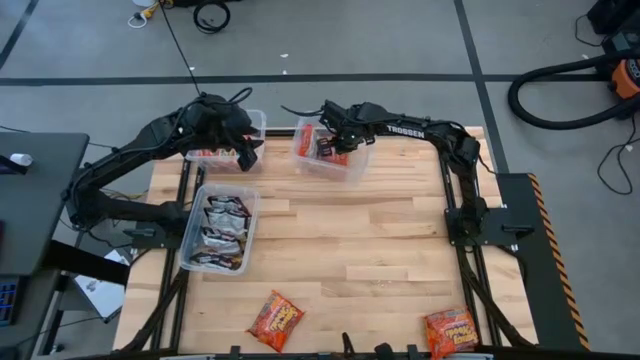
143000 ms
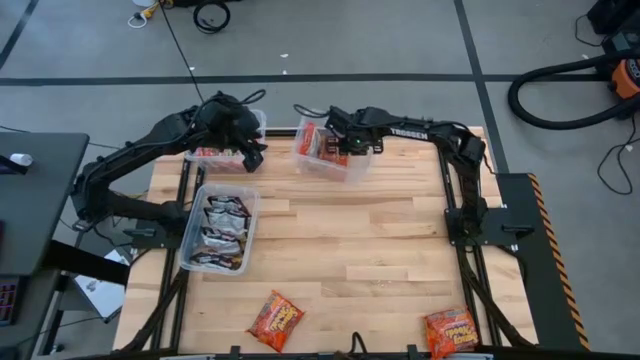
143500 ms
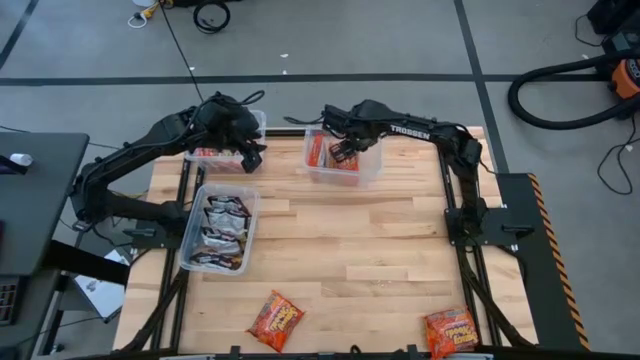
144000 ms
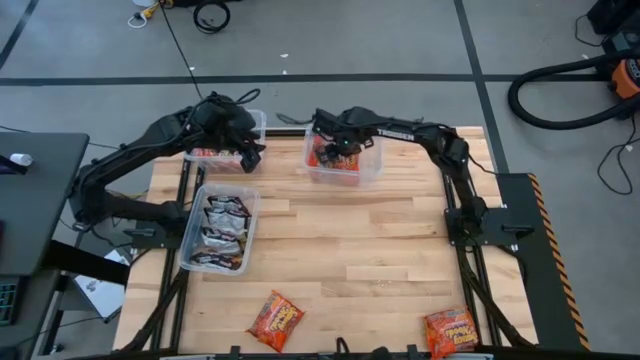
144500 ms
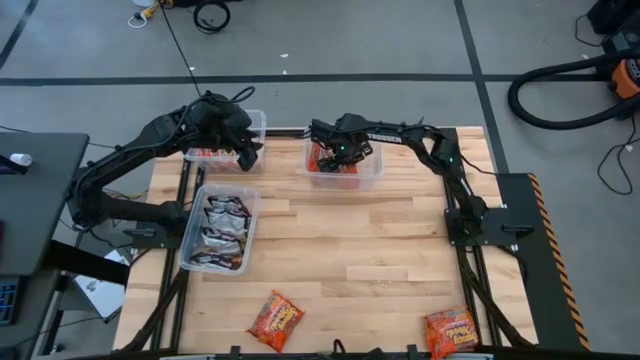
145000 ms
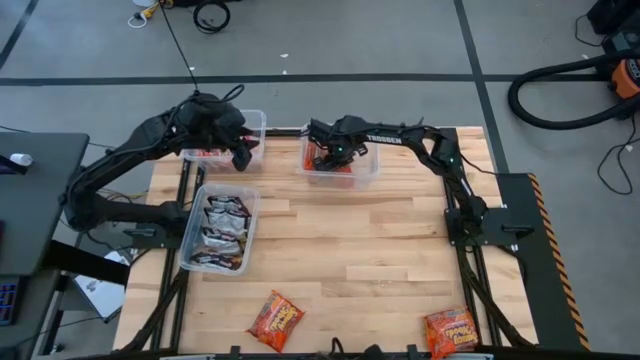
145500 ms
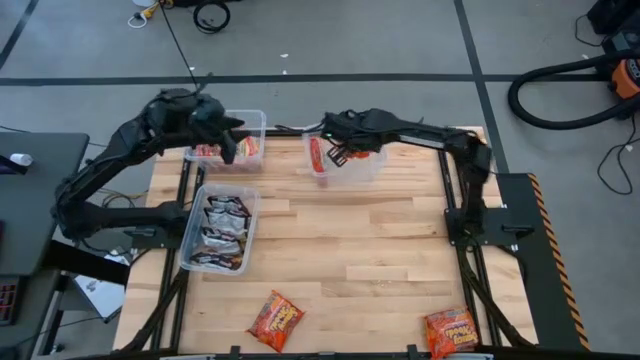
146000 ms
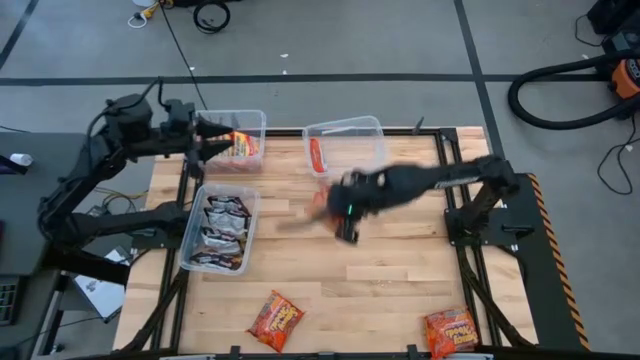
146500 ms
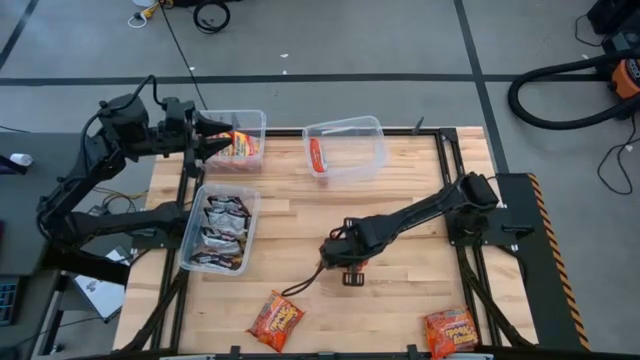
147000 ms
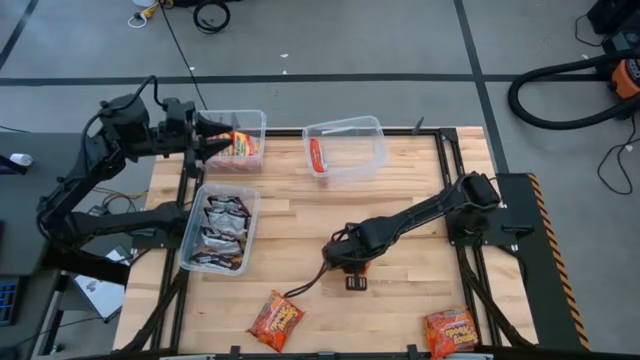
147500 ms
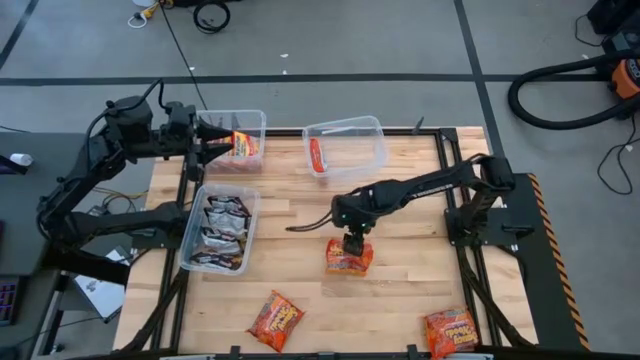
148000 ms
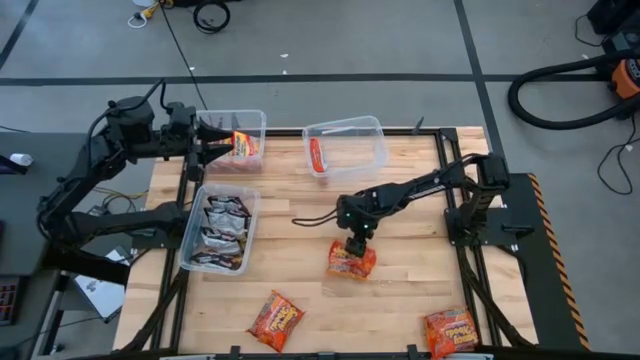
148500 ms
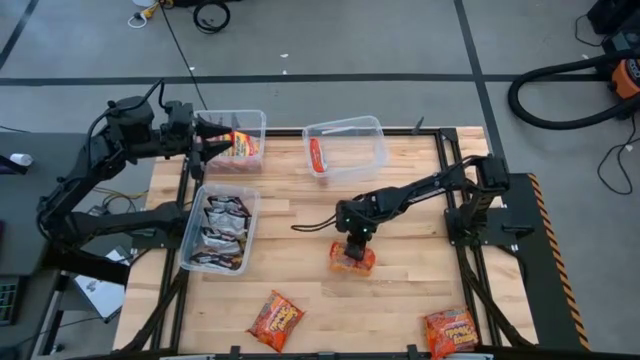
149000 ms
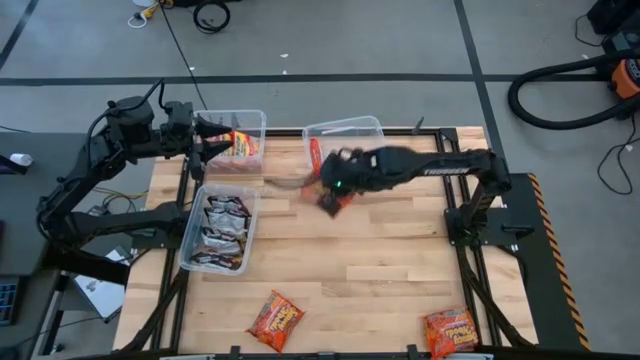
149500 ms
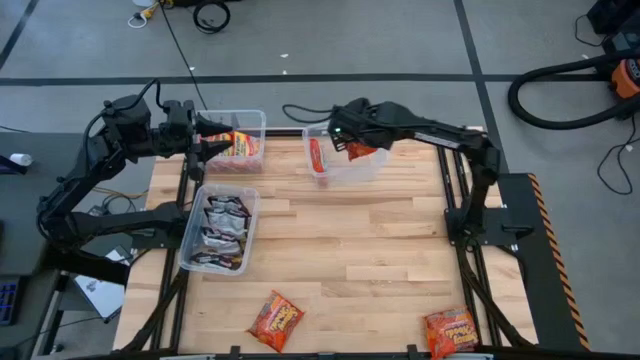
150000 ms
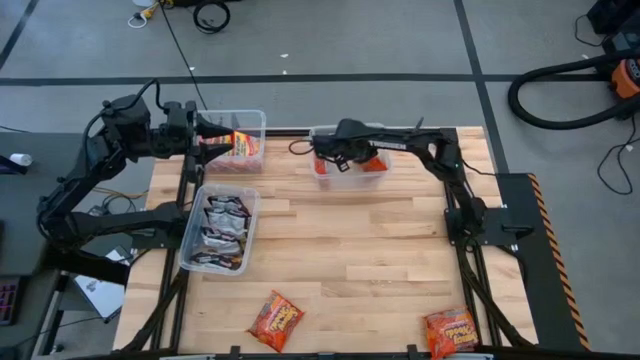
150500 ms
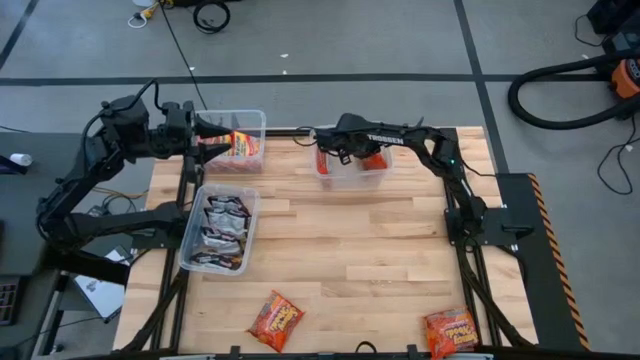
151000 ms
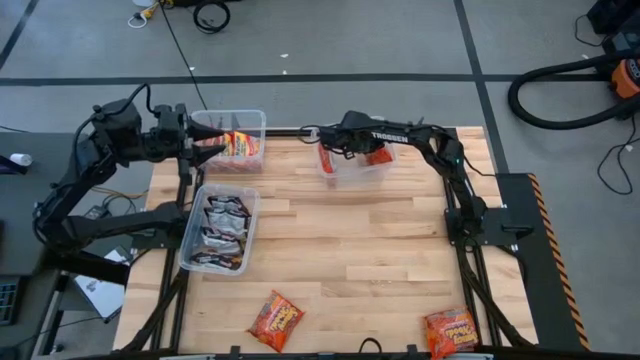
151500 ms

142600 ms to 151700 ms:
Task: Sort Maruchan noodles
Put the center orange noodle into the top transparent bin

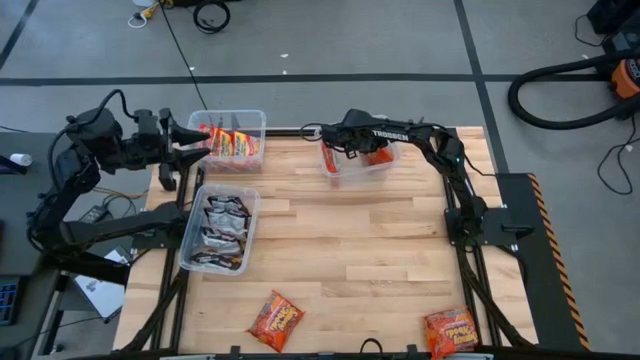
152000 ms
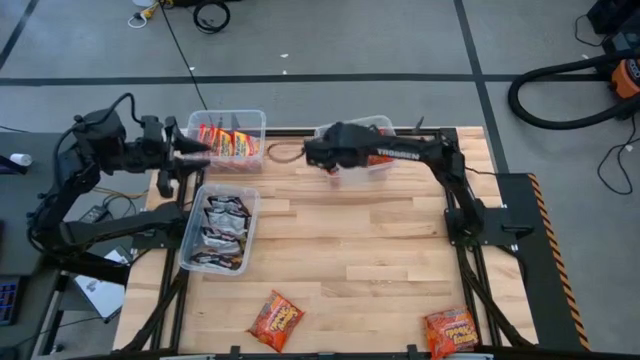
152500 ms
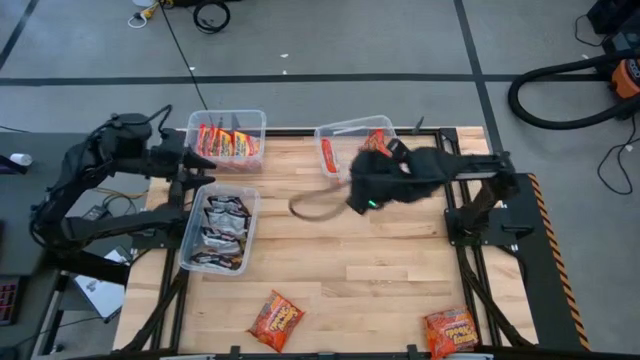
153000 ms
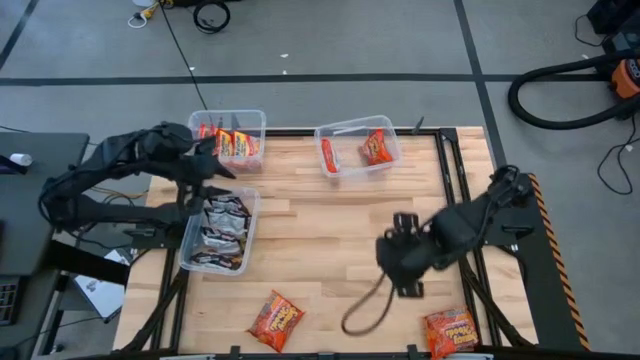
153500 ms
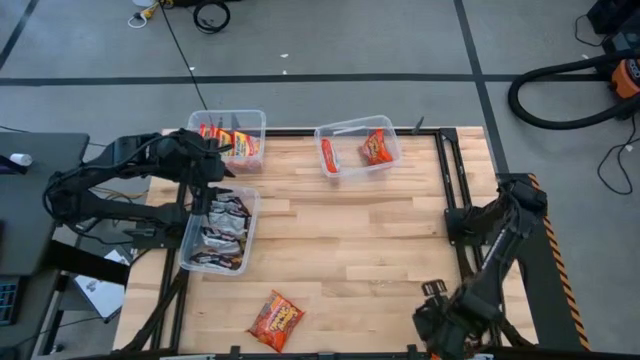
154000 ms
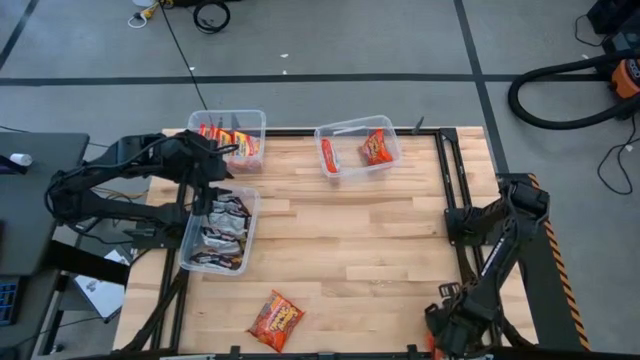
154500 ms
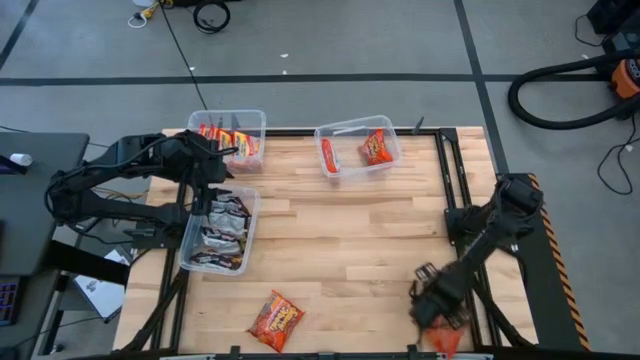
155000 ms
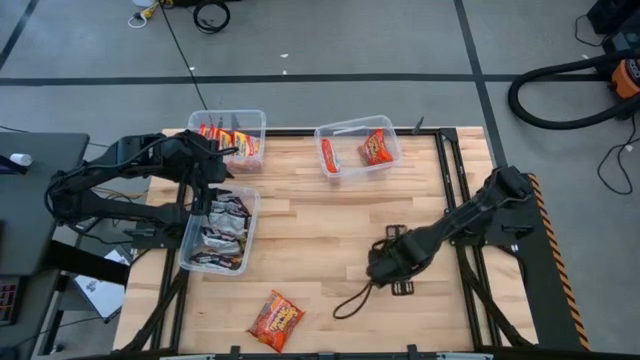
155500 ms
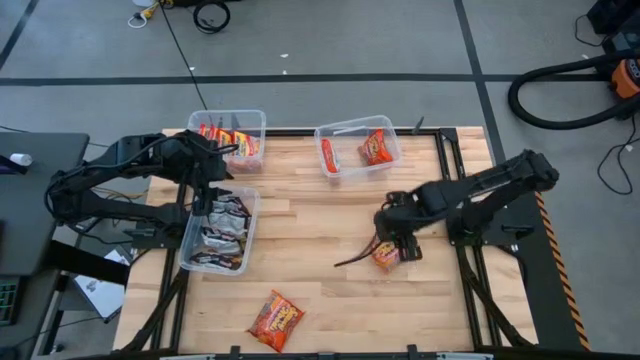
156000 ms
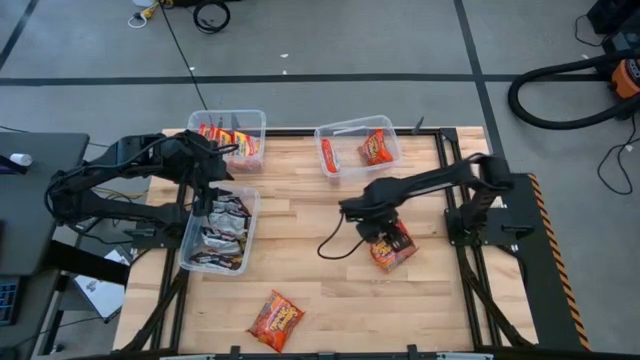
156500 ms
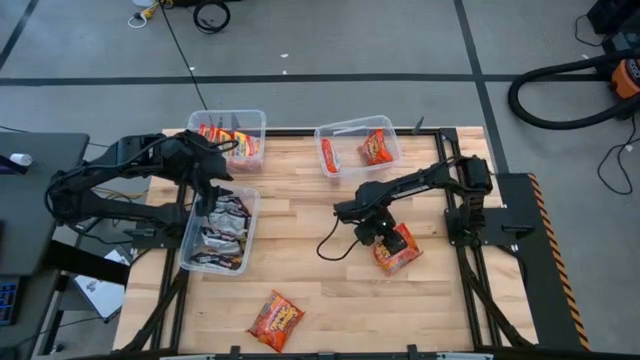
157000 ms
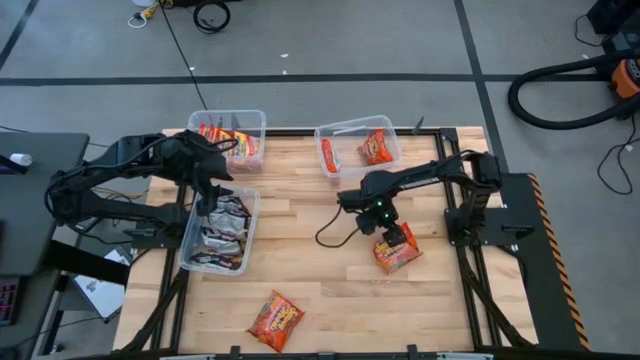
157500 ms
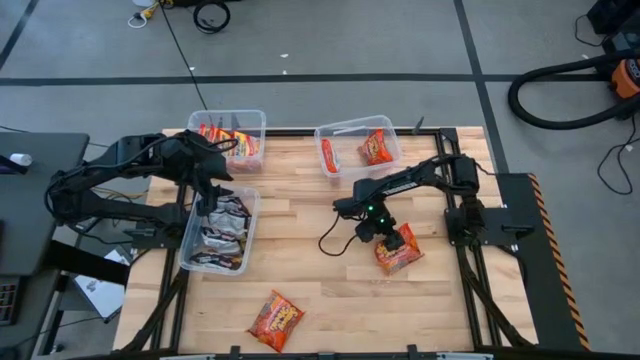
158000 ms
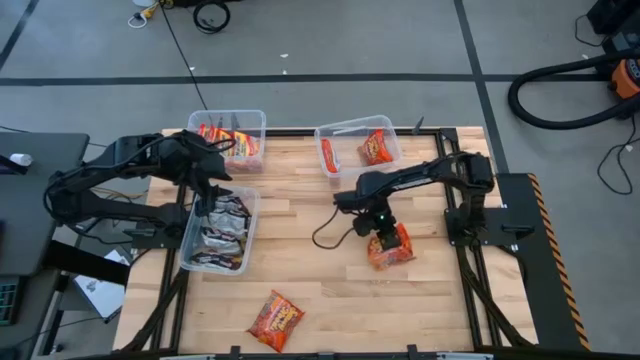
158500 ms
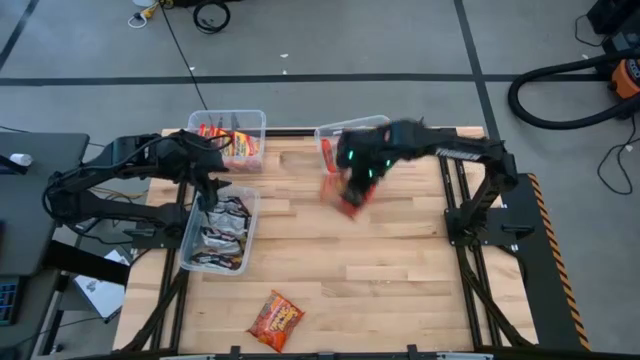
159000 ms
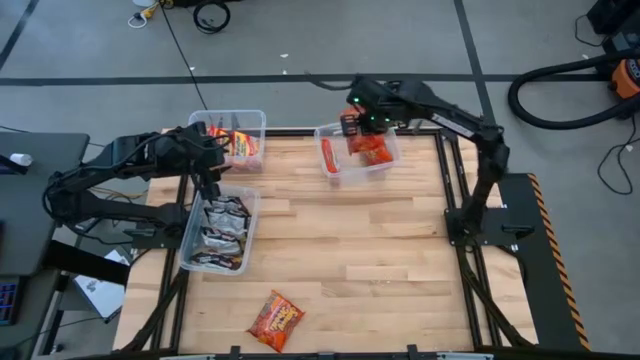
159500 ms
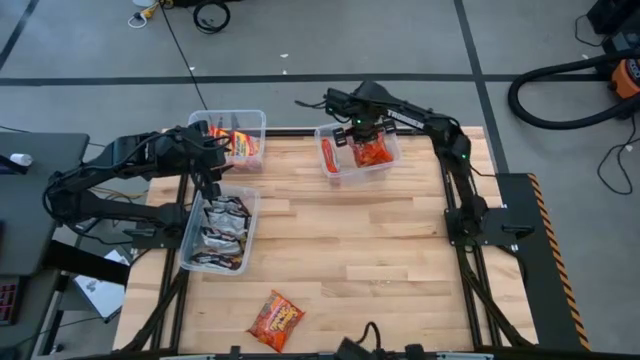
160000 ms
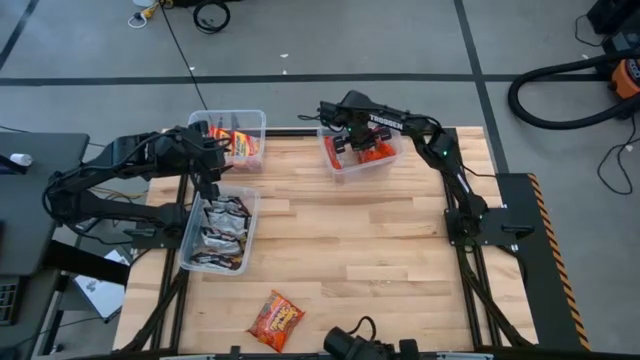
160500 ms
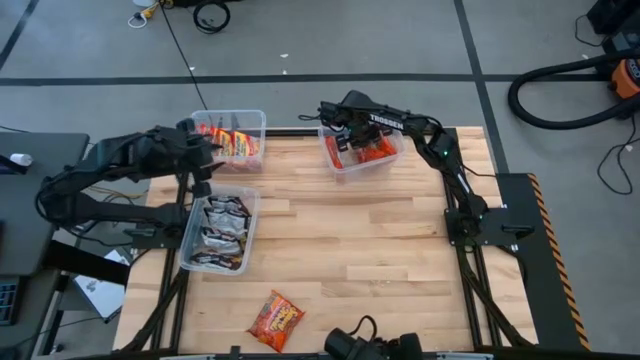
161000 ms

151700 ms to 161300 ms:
Put the right orange noodle pack into the top right transparent bin
